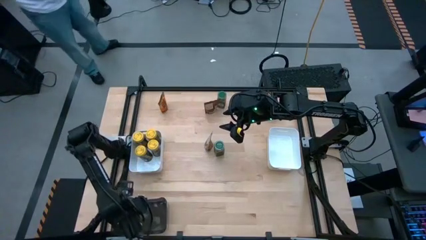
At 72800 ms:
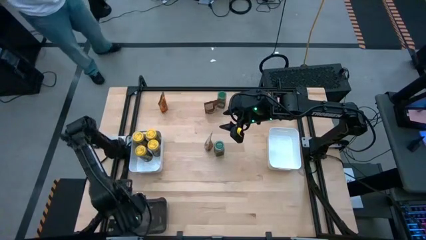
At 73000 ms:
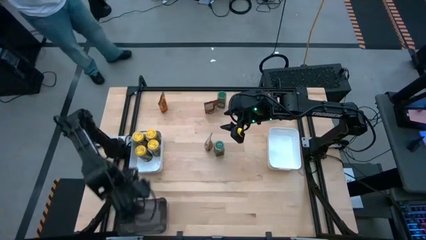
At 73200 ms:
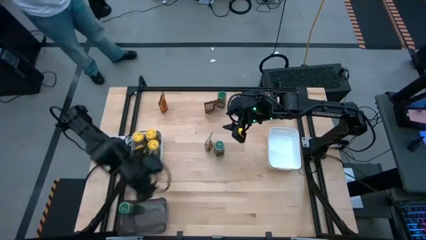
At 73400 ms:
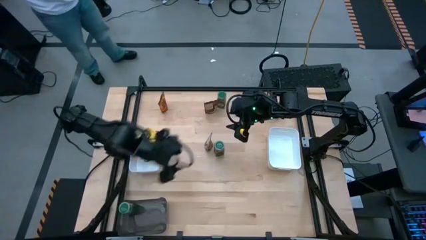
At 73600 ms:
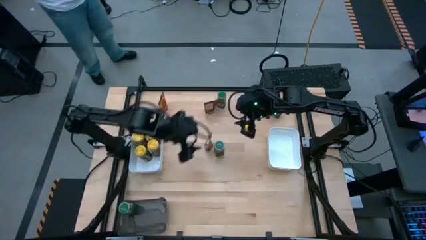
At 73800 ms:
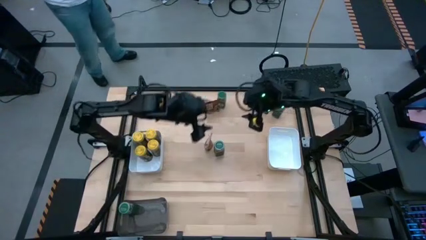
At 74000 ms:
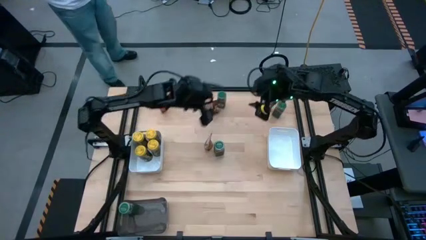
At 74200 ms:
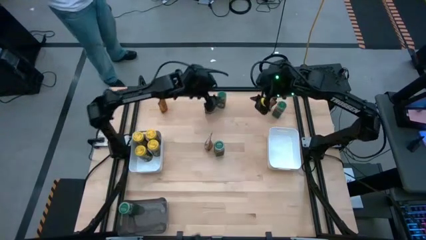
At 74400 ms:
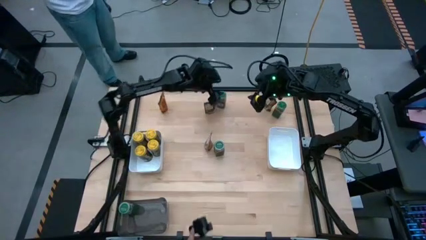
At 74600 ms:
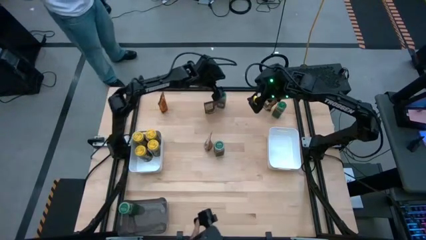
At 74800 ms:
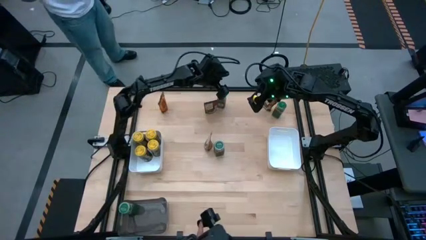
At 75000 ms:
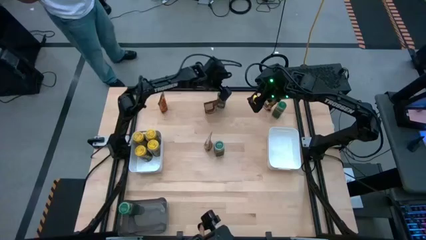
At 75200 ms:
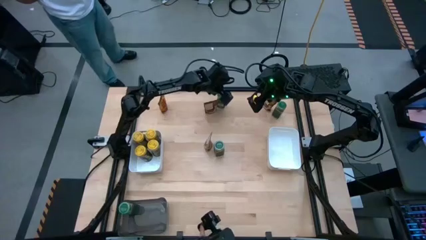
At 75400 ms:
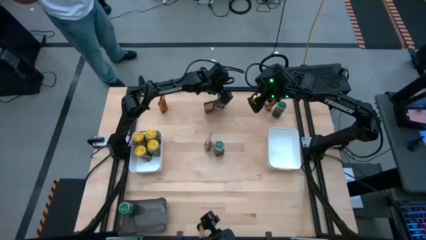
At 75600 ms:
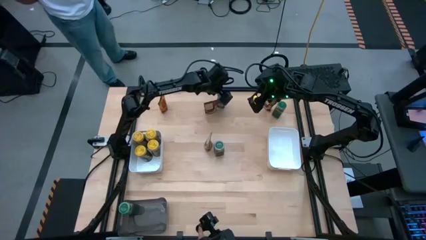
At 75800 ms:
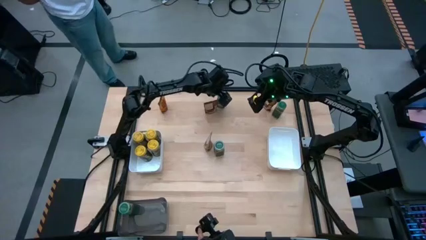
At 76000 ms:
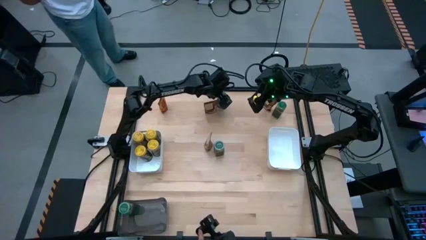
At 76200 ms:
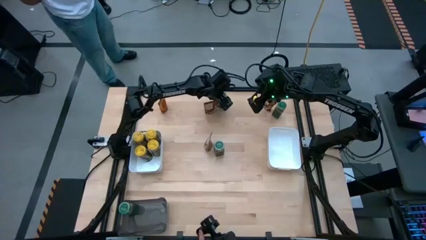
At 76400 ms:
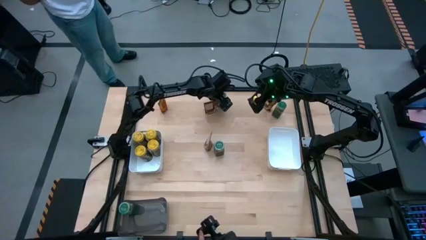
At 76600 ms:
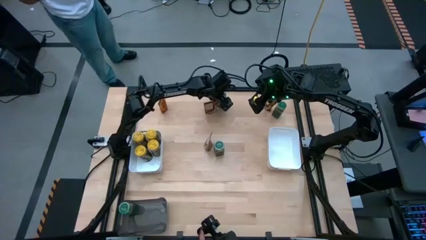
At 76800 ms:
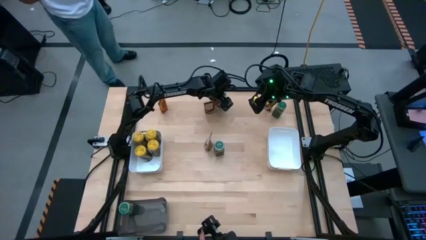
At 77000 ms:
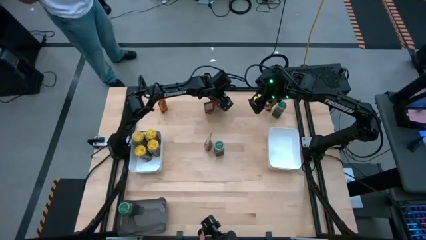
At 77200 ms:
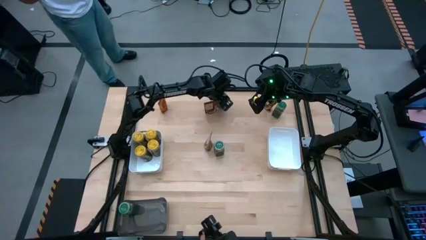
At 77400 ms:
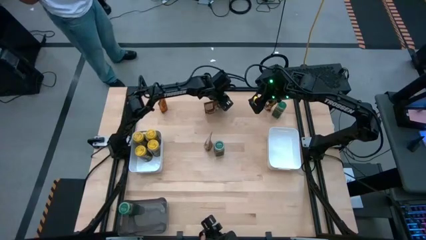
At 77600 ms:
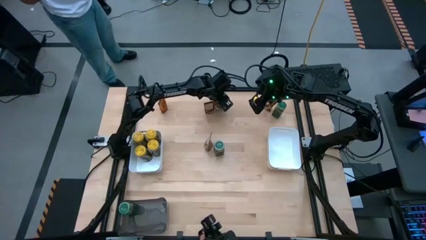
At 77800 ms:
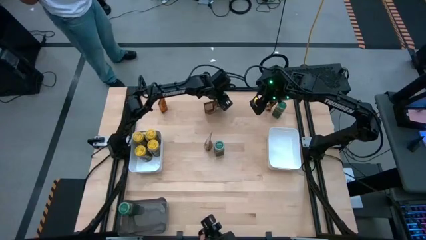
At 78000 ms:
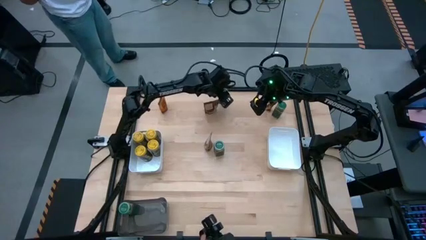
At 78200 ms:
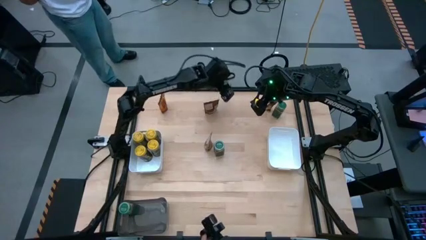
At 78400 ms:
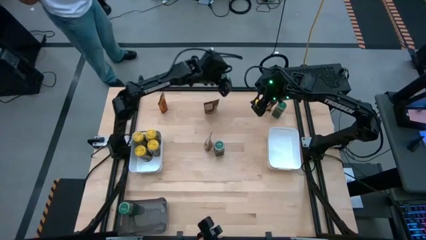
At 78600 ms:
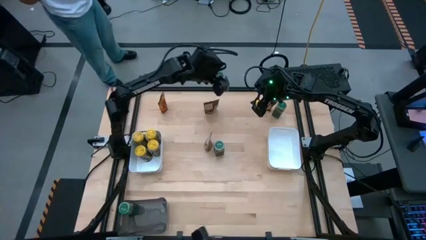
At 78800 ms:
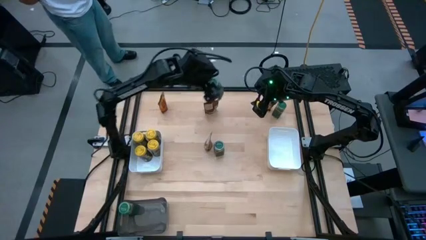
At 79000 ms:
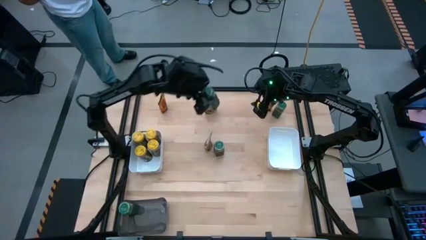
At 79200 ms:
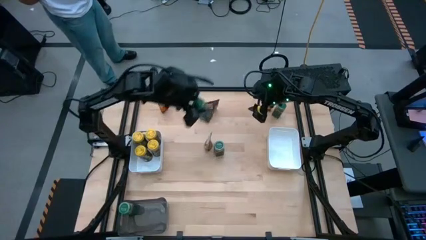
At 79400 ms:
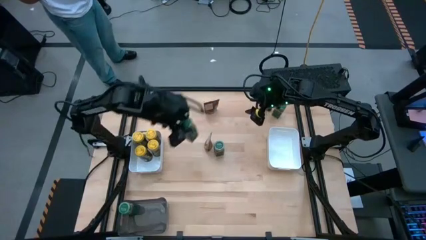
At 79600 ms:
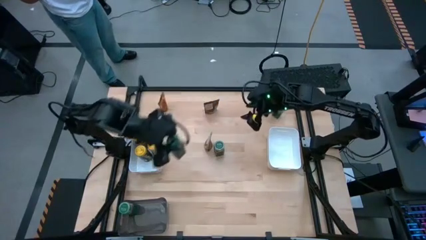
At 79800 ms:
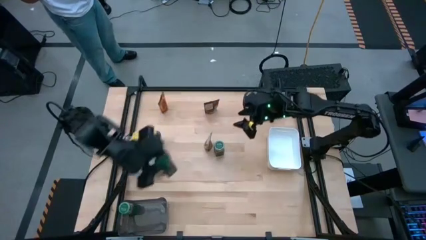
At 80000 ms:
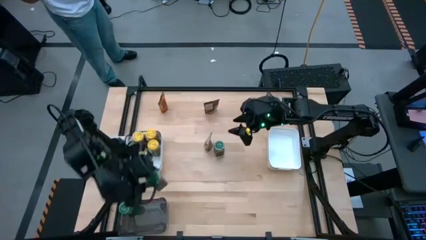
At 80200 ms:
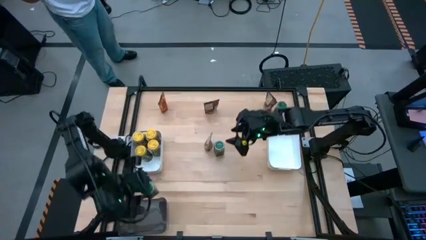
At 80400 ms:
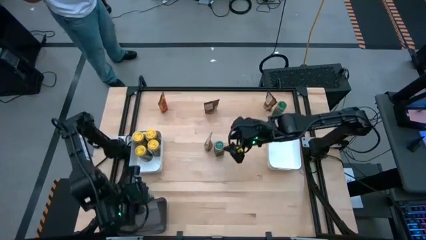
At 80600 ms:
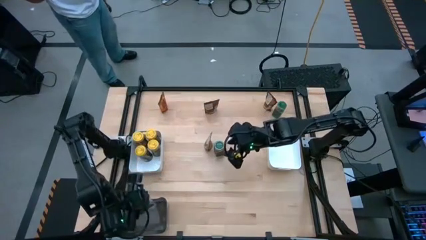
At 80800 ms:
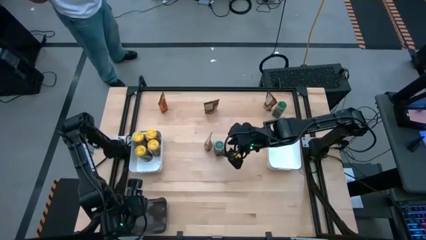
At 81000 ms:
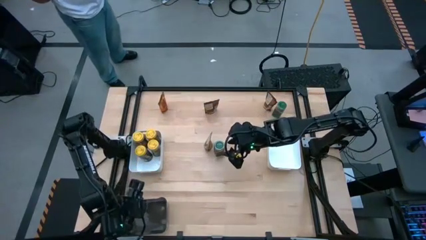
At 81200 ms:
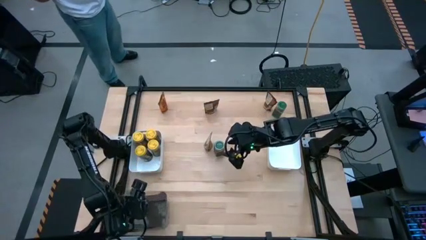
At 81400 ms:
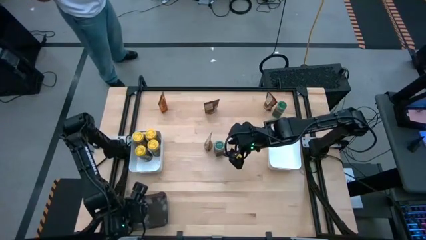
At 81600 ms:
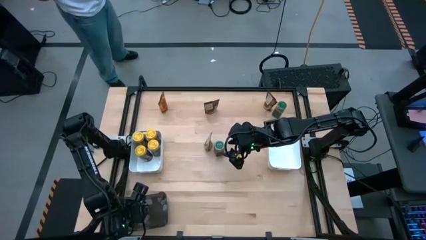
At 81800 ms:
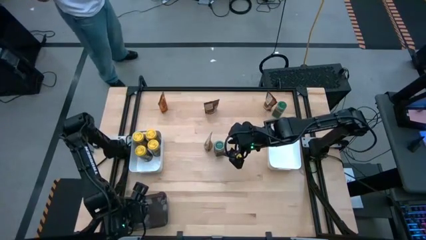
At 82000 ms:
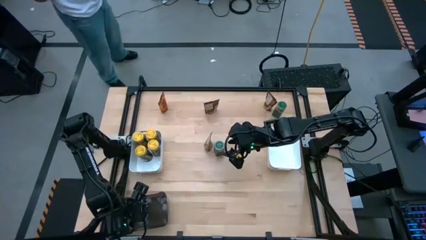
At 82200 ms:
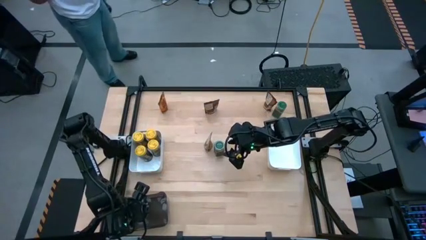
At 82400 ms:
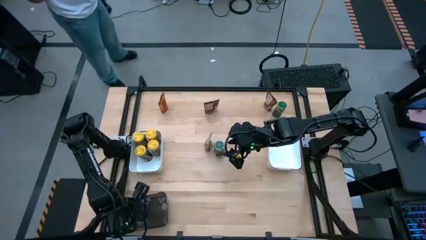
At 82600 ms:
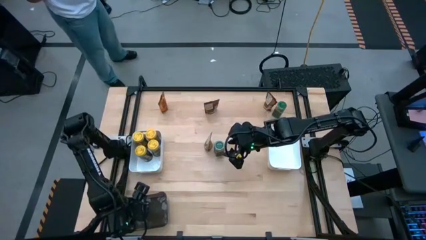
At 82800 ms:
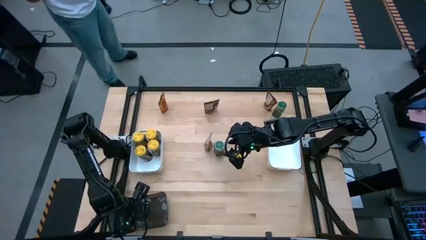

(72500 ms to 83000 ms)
Task: Sort spices by type
Put the top left green seasoning bottle into the black bin

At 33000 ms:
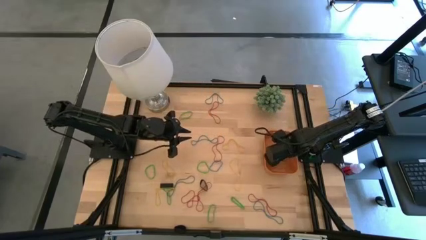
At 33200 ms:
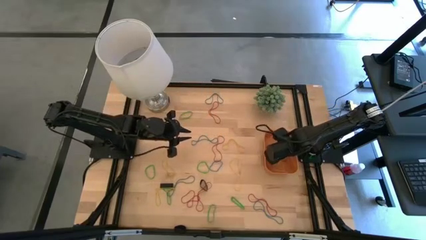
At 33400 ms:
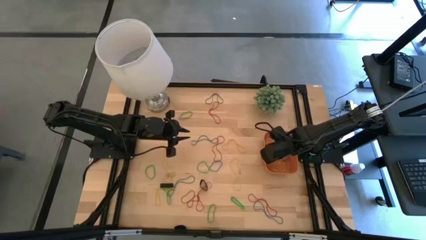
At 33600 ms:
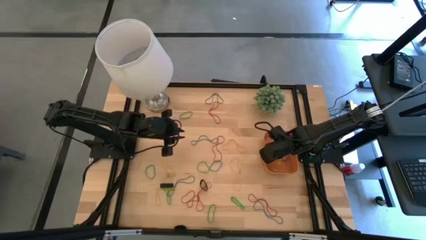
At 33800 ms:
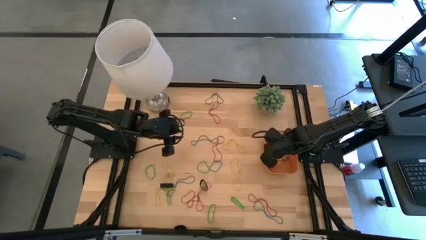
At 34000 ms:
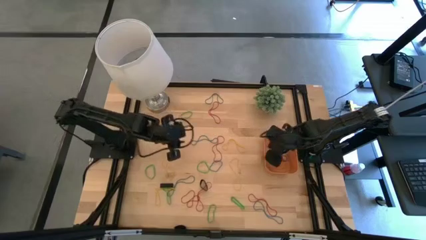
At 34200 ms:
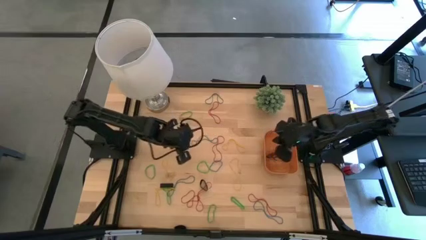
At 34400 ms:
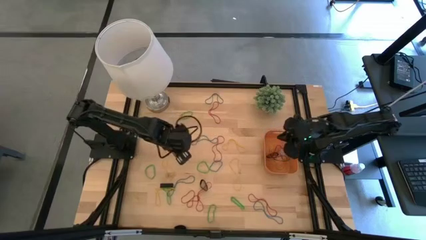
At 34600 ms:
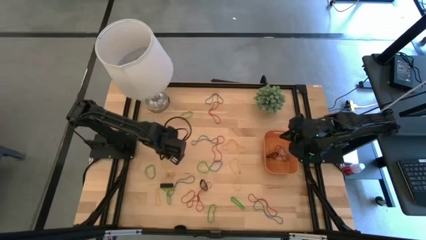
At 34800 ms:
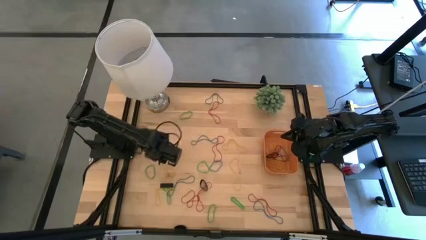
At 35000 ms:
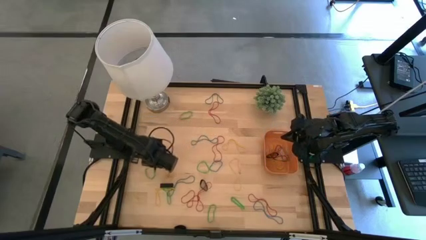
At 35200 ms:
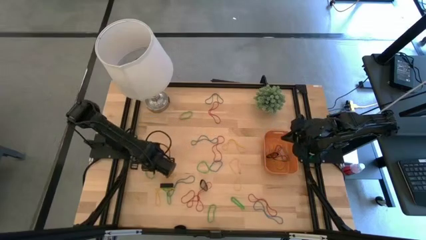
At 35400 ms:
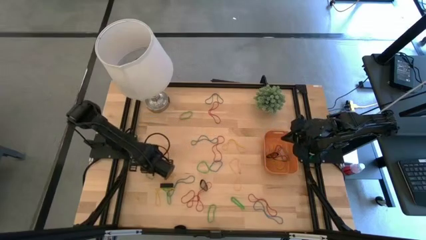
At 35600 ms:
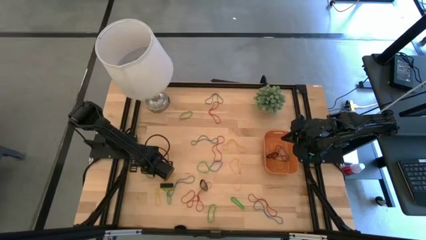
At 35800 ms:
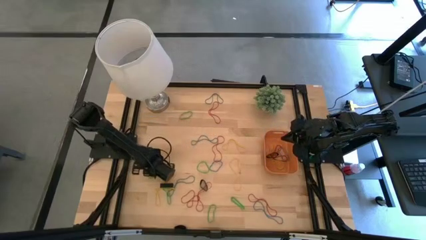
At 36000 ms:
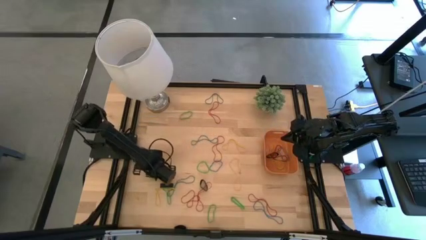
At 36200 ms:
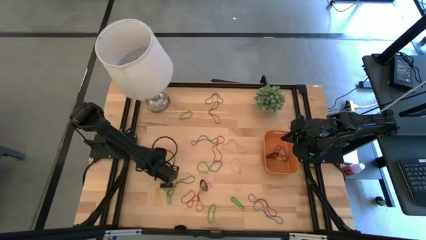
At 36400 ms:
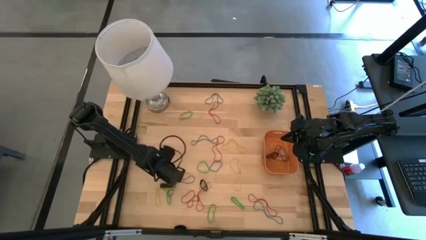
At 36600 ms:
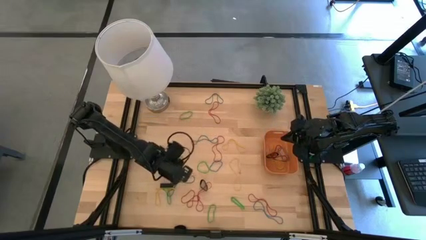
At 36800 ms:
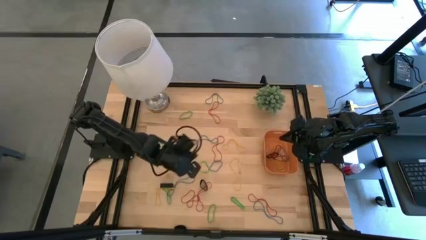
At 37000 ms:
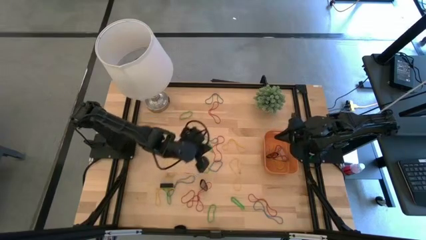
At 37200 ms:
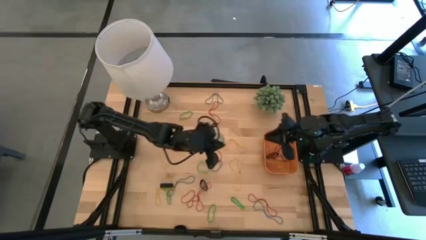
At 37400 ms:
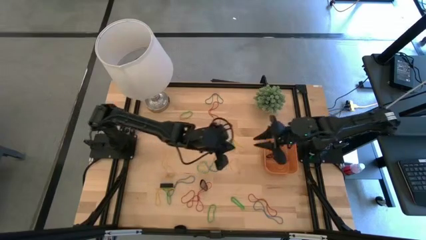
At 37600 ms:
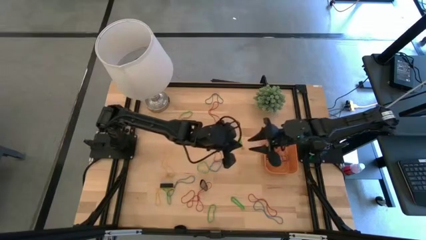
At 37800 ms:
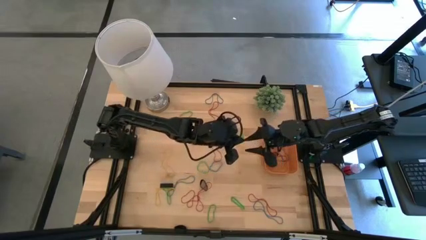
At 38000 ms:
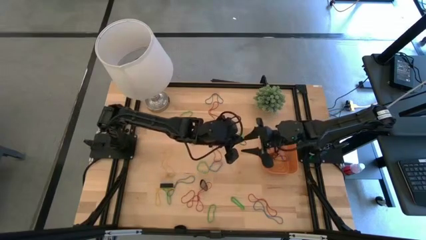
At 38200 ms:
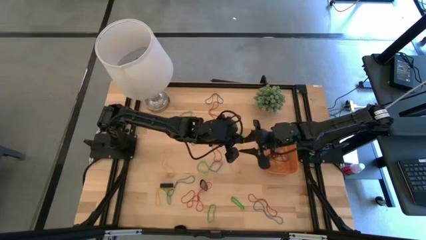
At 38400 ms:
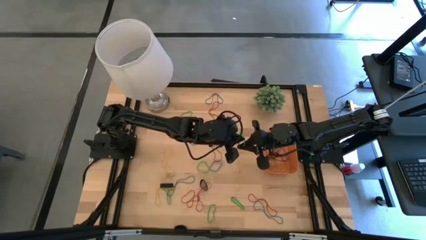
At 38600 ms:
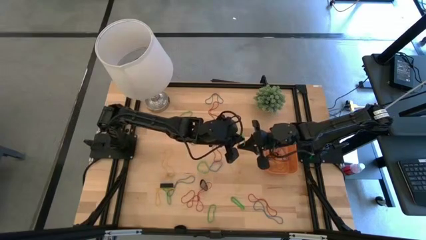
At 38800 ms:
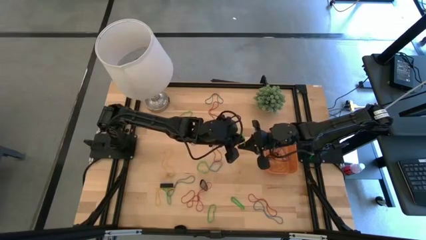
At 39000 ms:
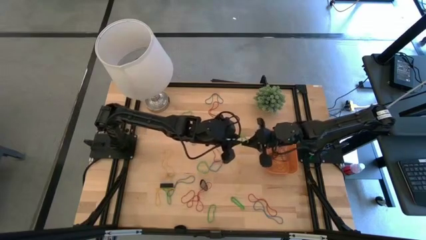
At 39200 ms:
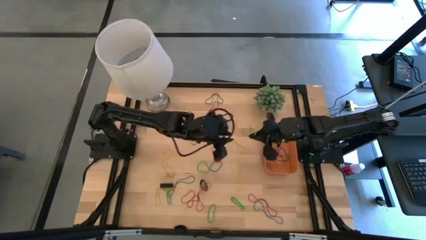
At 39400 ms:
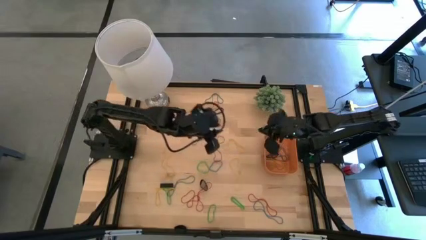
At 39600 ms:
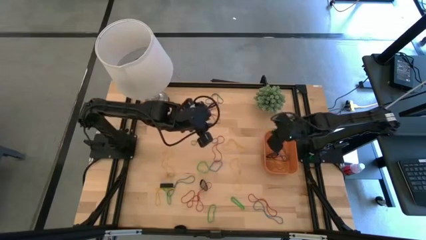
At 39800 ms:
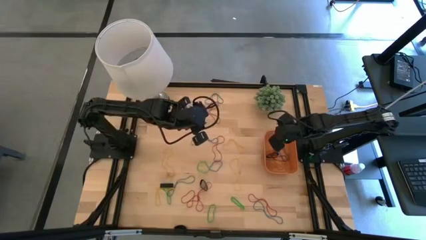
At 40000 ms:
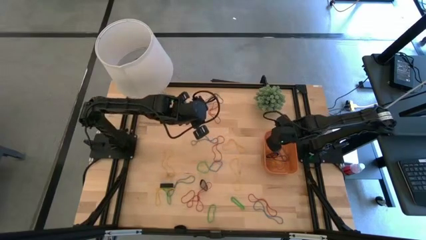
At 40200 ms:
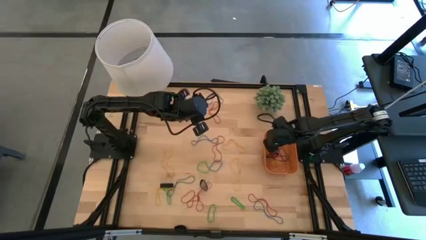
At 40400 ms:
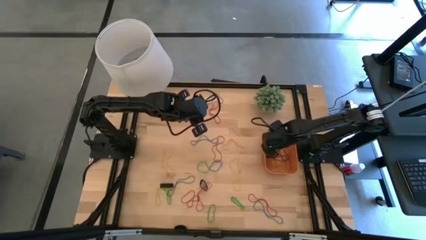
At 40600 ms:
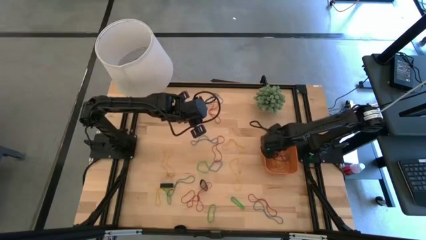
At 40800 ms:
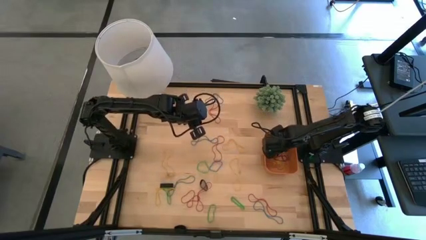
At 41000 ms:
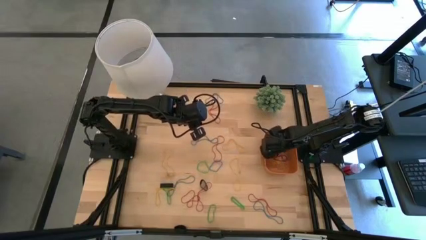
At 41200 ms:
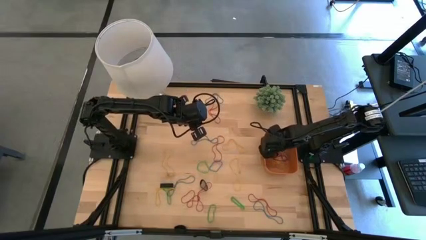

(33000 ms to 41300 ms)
Task: Pick and place rubber bands into bin
Put the green rubber band into the orange bin
